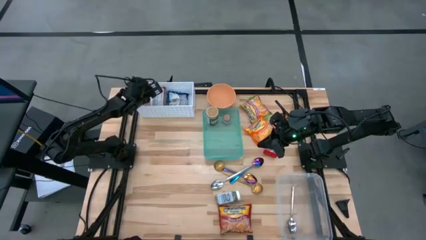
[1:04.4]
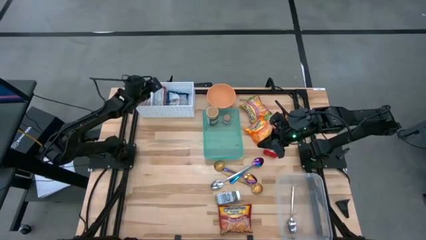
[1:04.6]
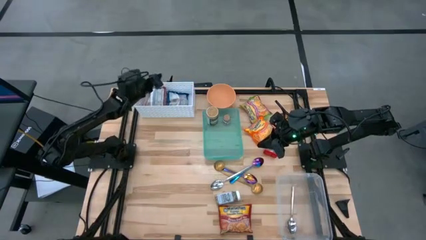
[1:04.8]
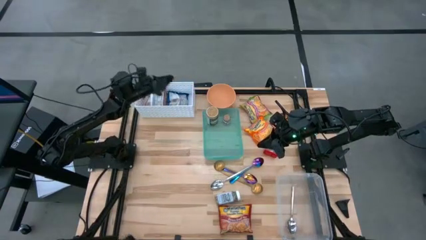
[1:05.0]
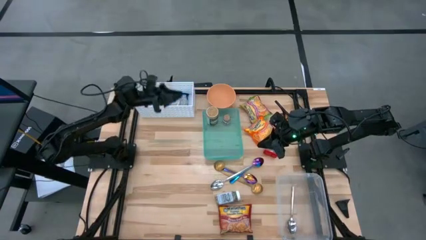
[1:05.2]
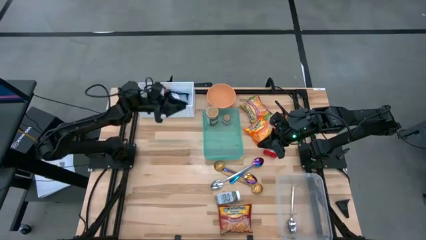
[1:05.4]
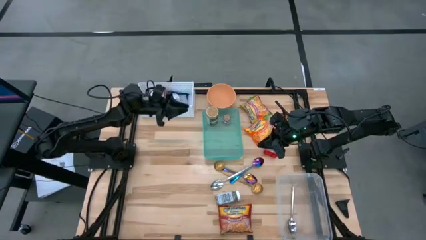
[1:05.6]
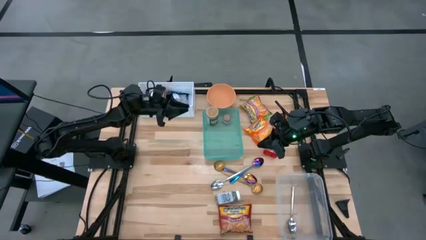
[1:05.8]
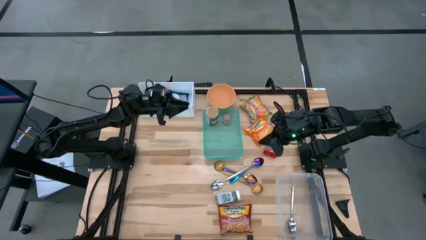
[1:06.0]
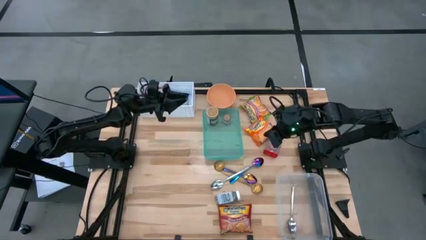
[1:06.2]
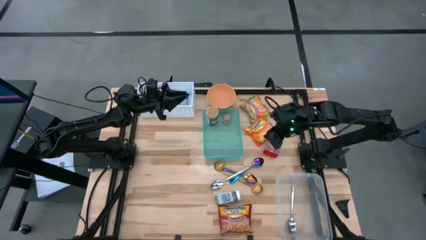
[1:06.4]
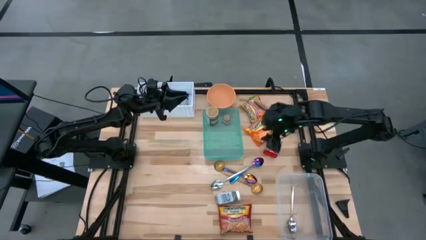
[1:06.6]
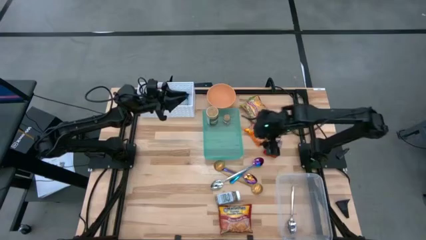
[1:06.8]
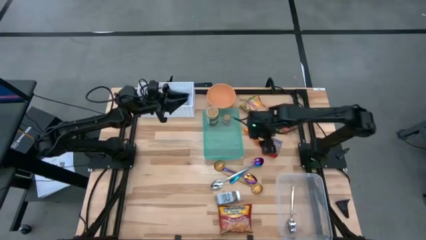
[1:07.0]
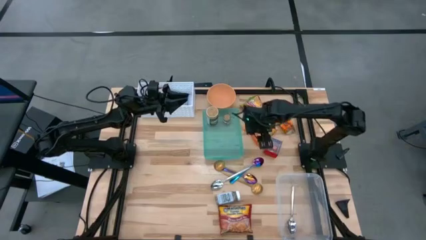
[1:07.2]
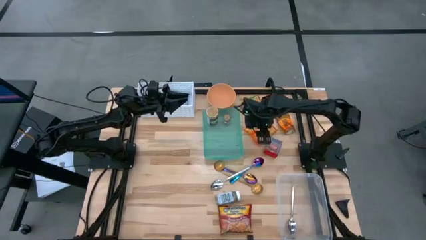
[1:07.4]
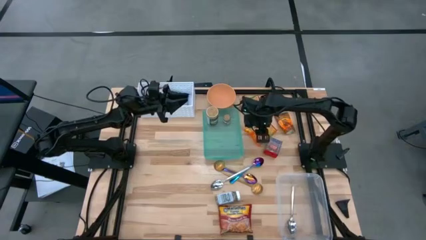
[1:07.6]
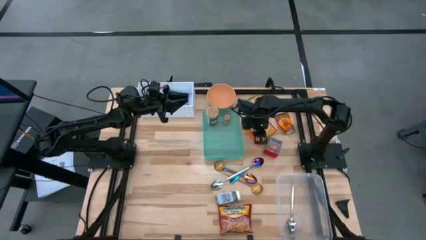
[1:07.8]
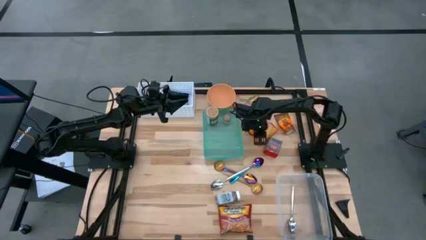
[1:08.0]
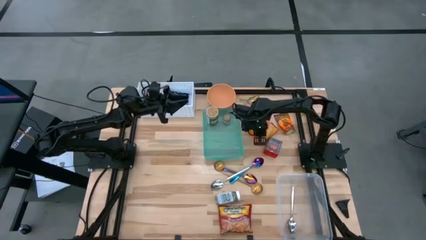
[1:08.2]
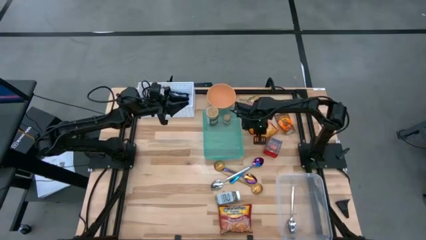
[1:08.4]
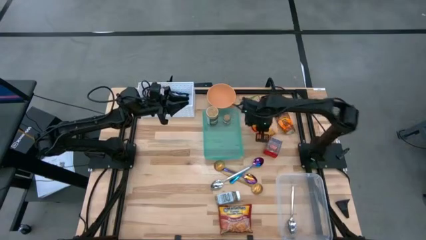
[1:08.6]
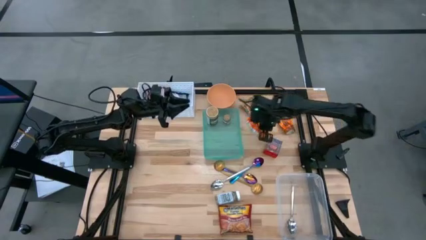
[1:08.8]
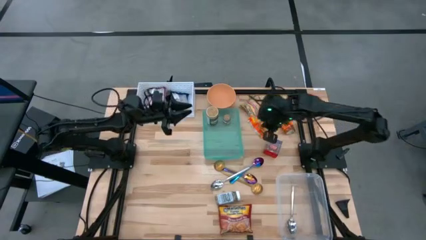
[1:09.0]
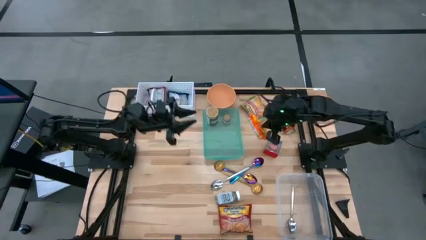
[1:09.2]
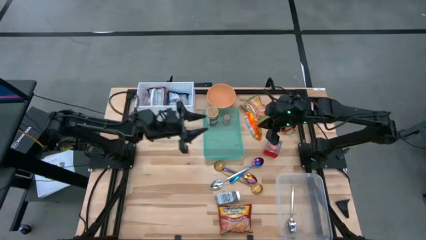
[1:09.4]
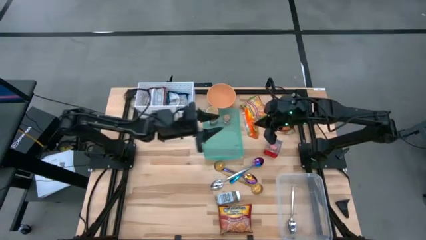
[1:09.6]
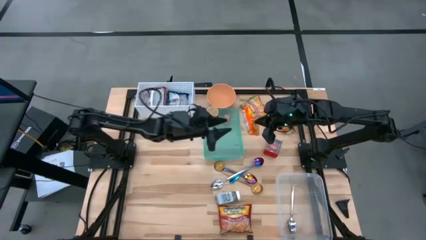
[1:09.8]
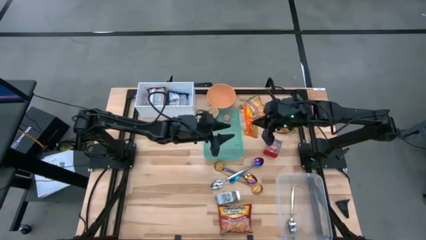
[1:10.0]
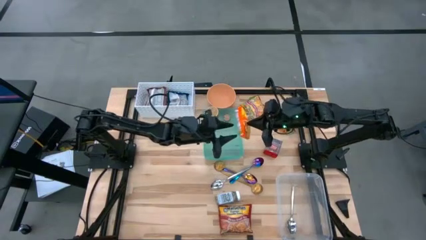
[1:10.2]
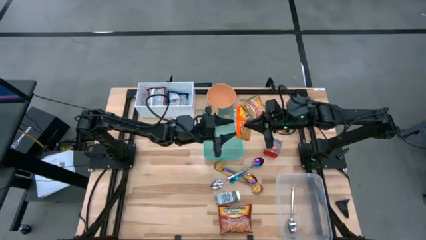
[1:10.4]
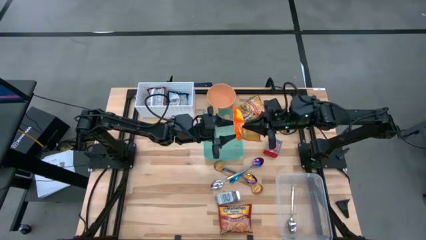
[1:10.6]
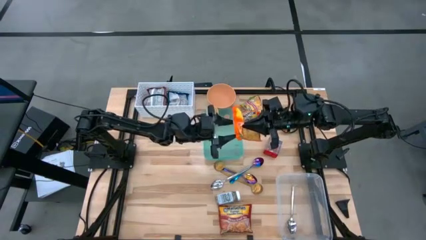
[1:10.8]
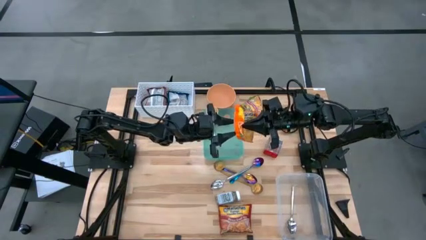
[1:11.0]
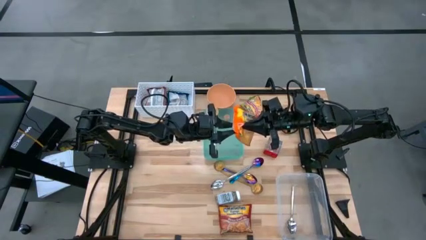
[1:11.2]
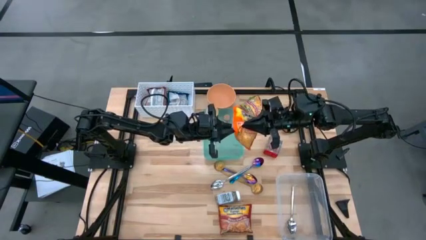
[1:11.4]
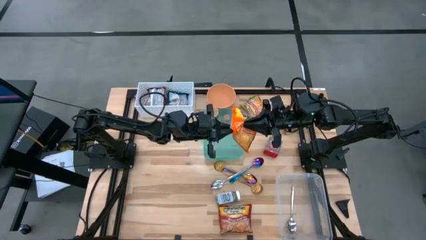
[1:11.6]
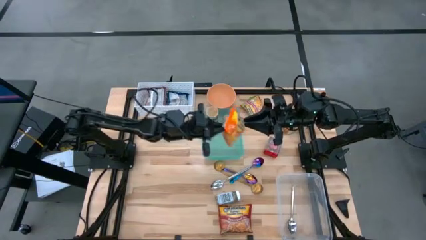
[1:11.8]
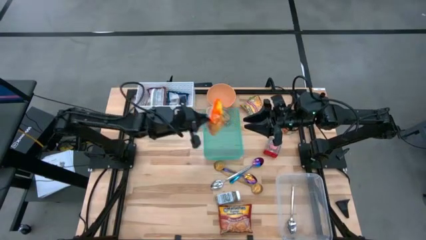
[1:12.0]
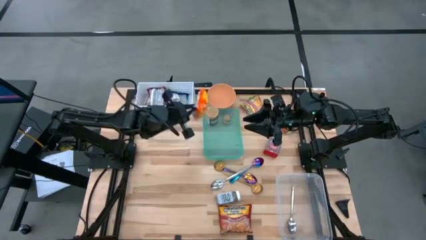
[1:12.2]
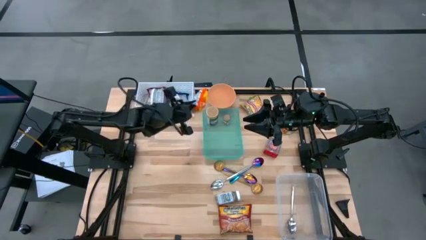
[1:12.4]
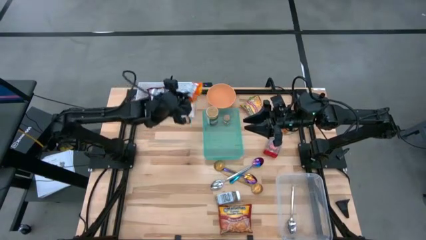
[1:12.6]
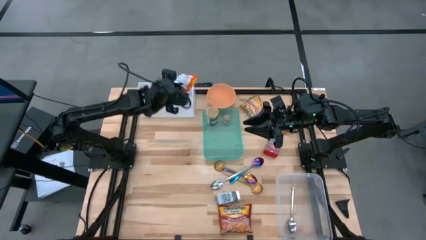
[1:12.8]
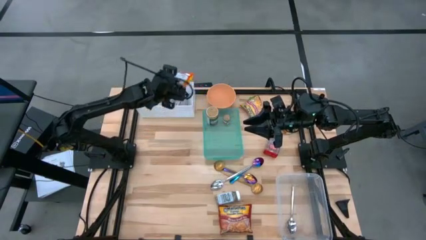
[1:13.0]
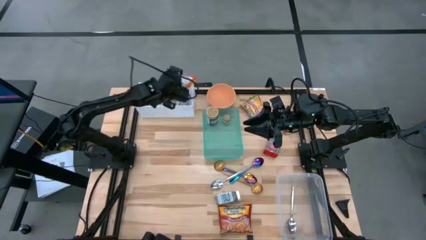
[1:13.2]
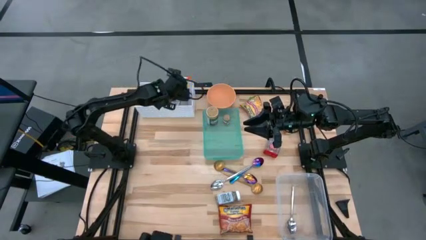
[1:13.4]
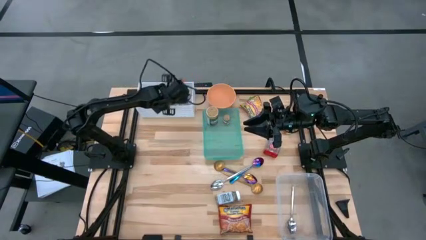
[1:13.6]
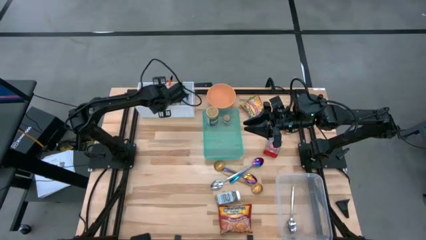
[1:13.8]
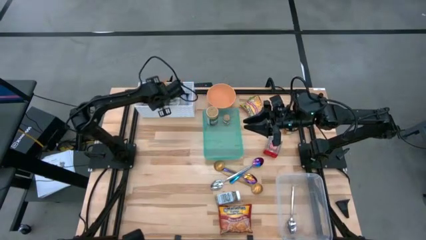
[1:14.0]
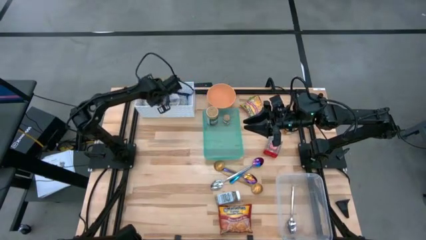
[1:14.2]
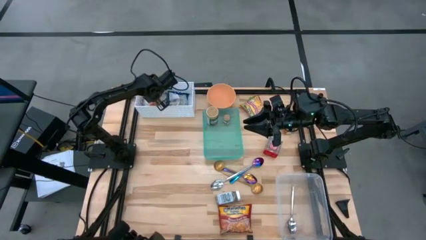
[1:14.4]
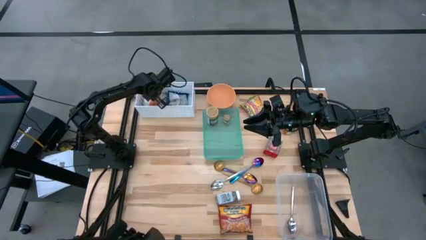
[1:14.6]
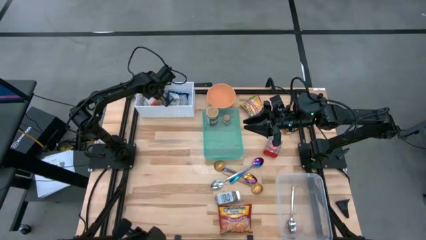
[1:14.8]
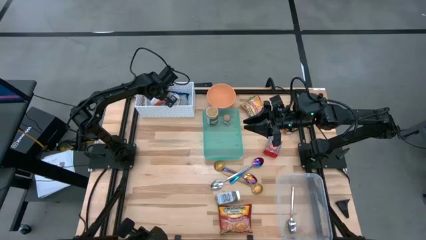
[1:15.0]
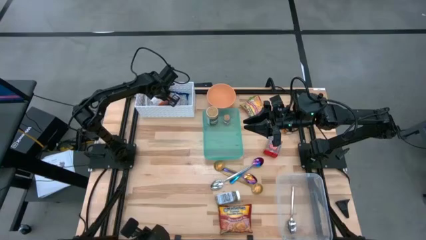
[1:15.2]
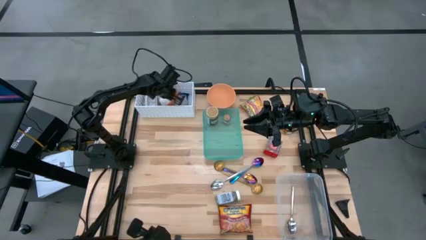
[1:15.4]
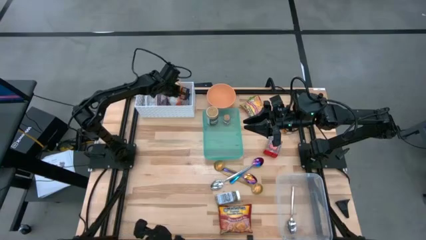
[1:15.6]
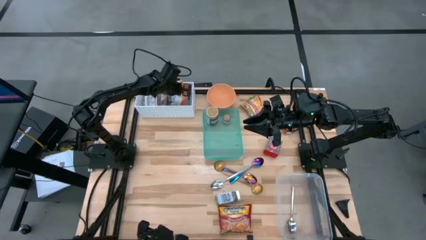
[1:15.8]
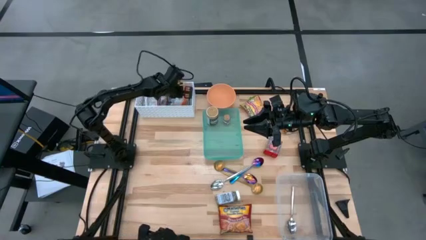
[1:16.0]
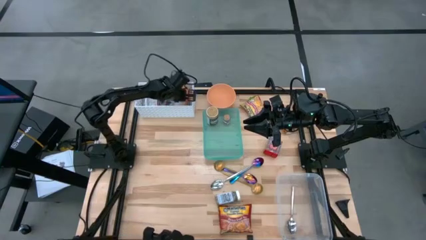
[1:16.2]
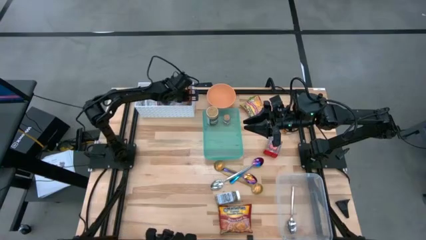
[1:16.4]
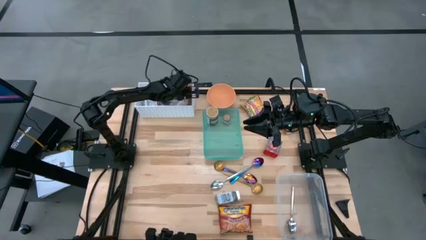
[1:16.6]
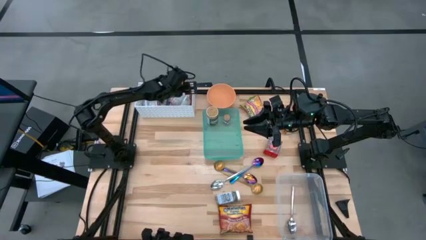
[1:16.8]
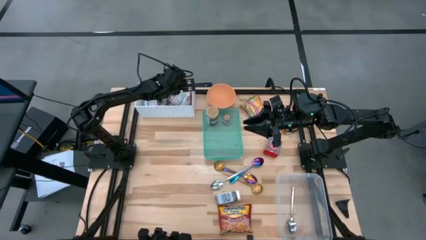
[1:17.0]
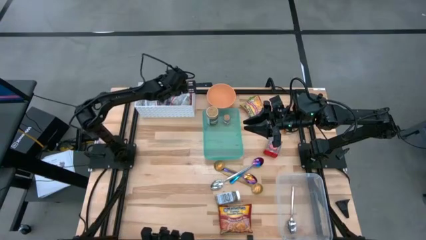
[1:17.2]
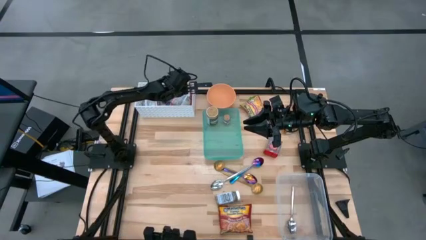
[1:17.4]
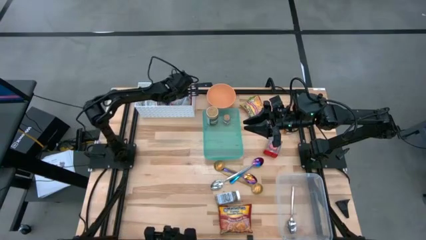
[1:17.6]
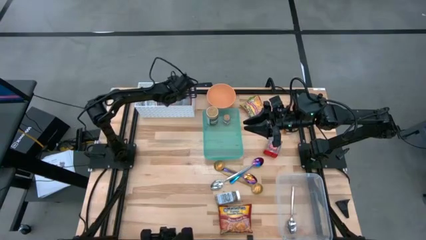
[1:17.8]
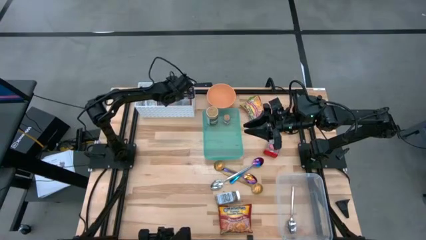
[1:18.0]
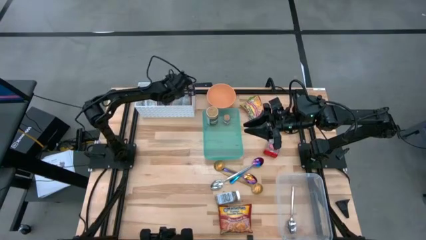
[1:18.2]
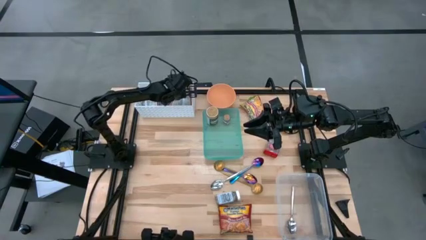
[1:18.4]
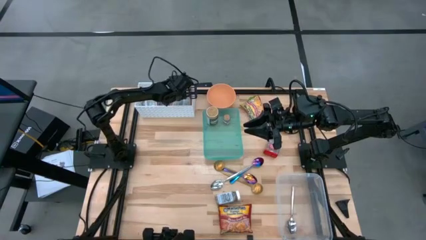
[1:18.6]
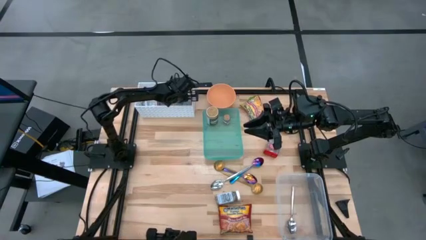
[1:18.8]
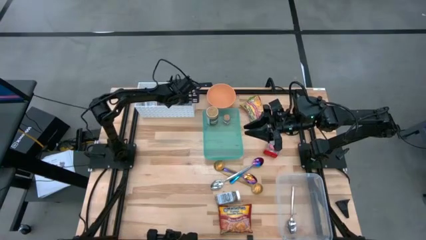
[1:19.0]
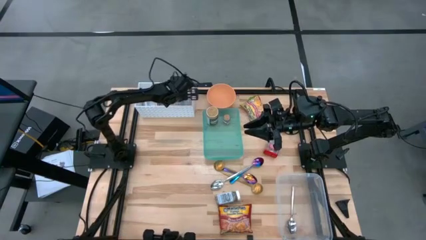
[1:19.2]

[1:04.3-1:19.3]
Task: Pick & Place Food Item
Put the orange noodles pack into the white bin
